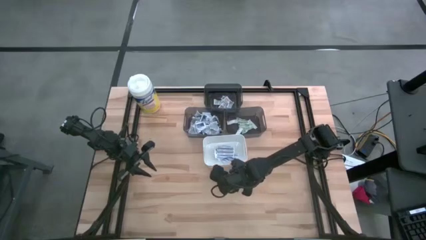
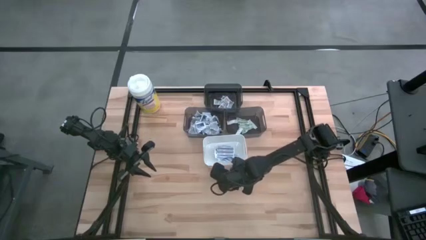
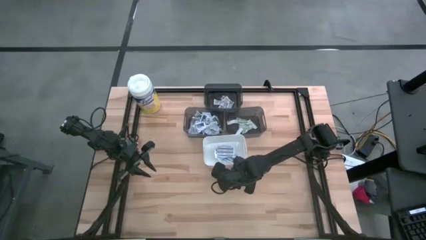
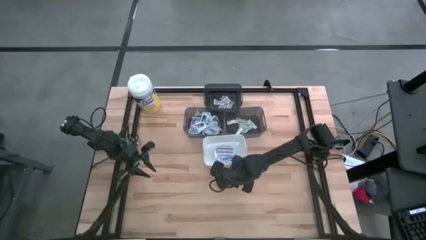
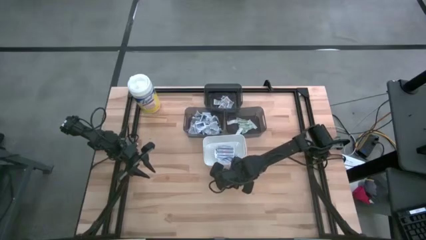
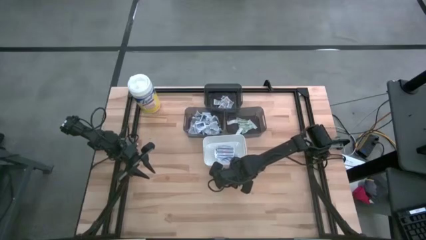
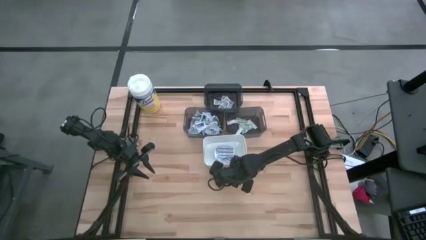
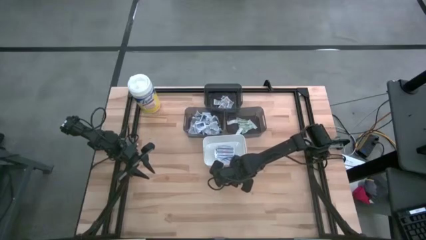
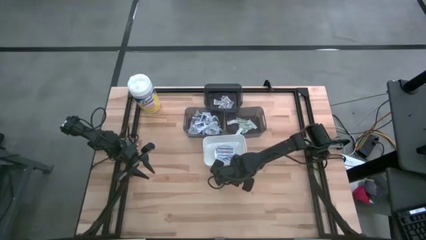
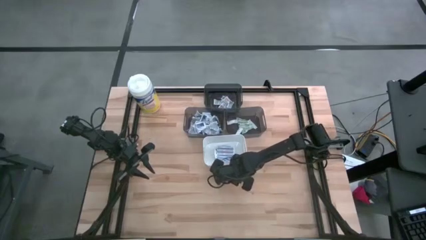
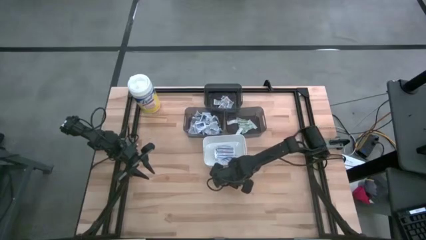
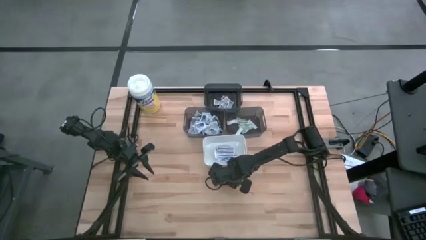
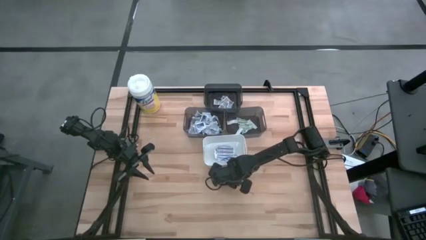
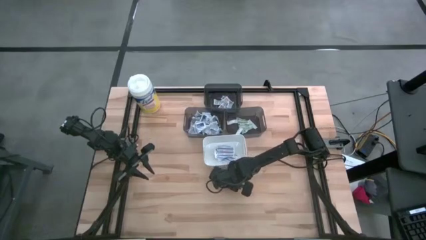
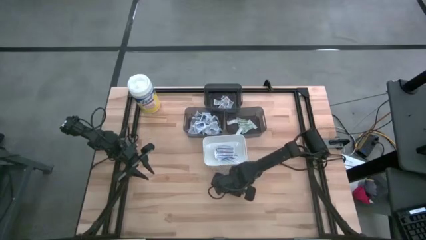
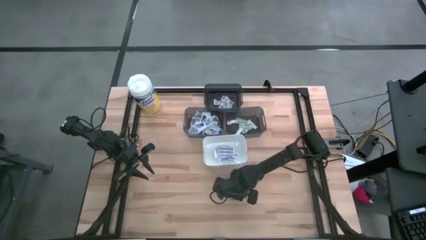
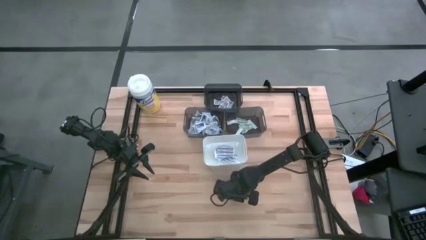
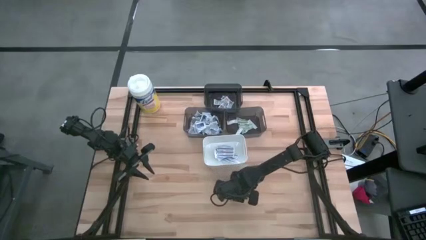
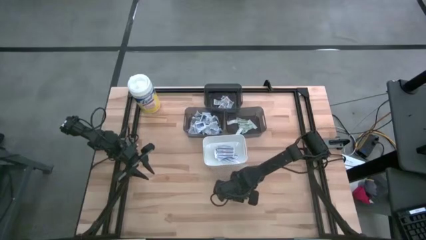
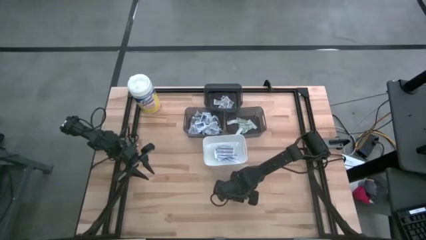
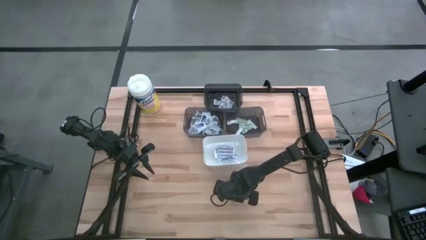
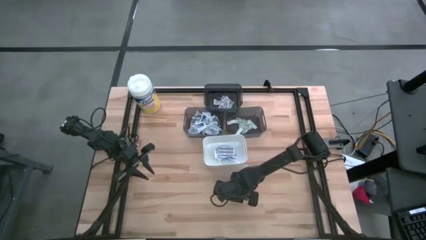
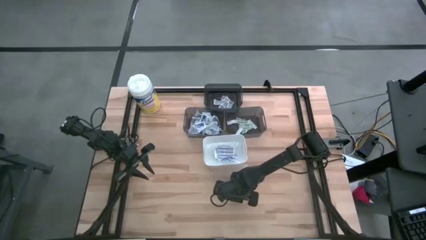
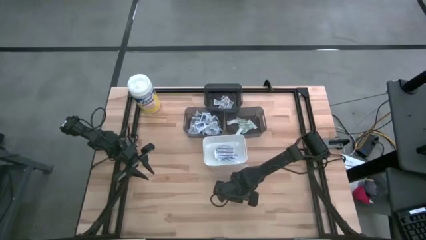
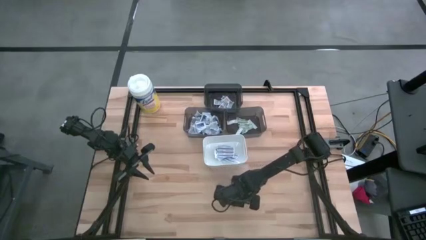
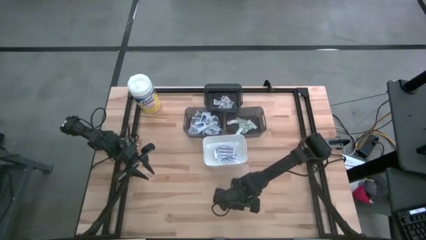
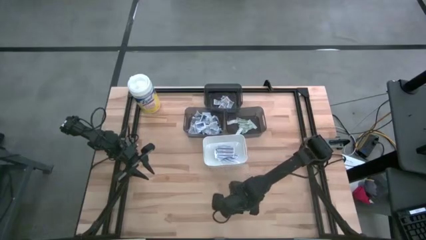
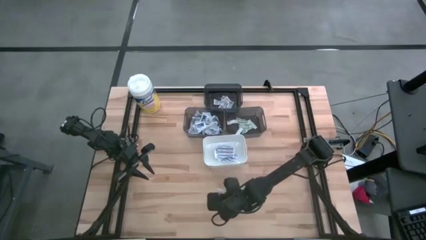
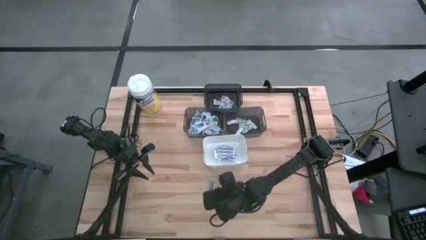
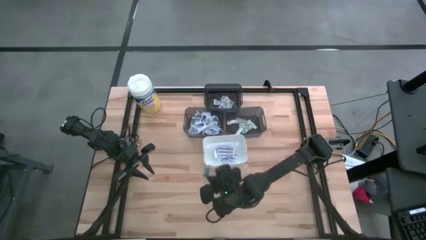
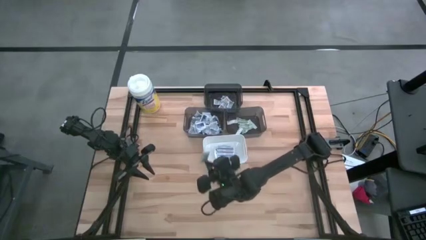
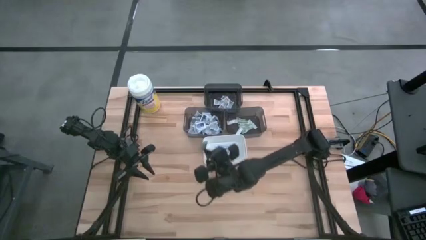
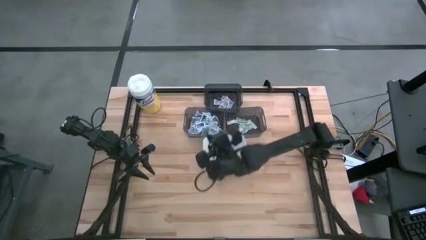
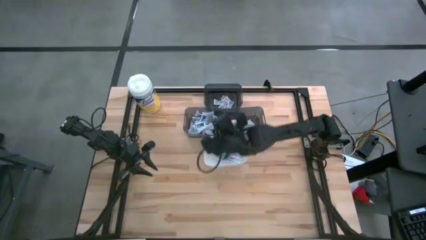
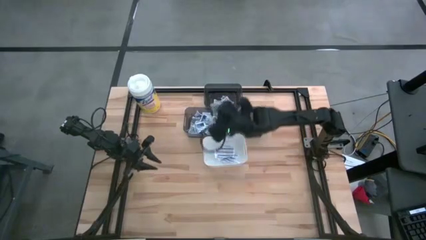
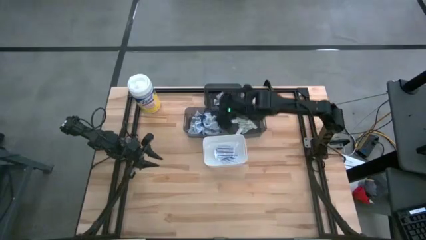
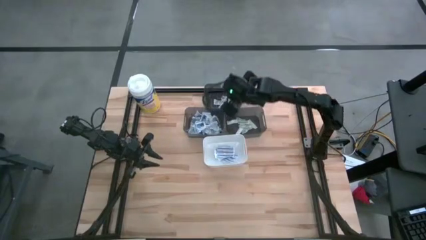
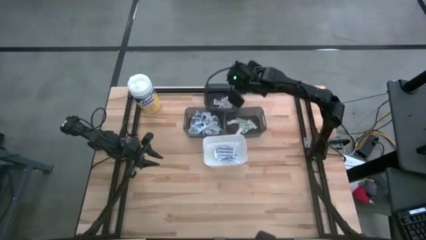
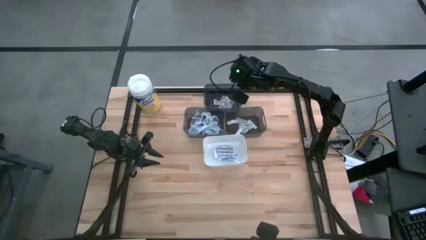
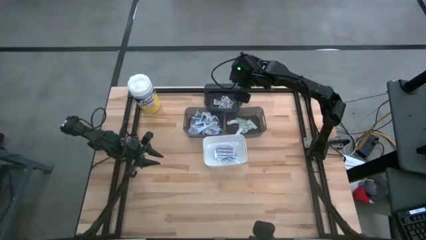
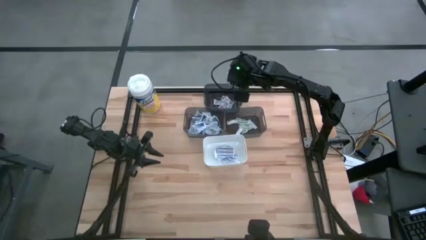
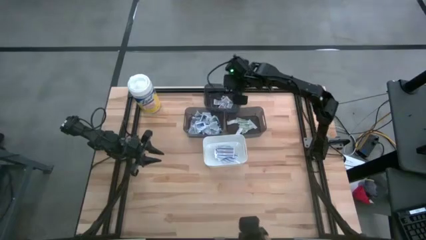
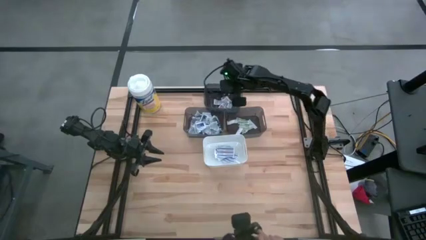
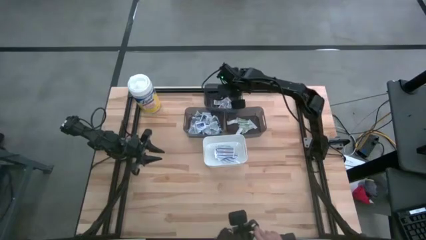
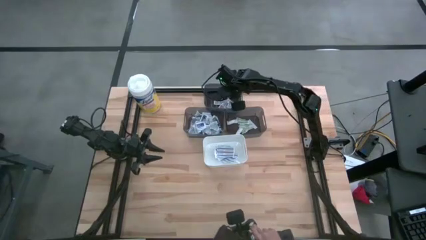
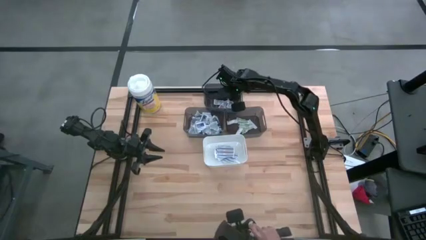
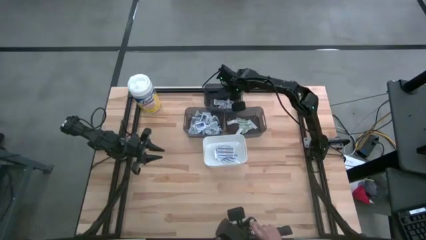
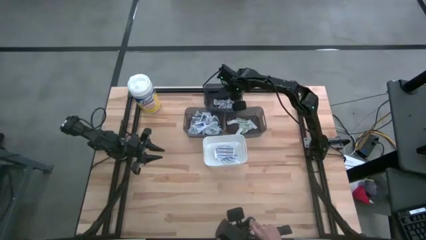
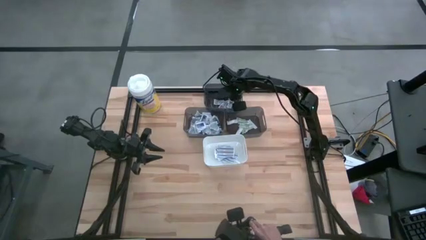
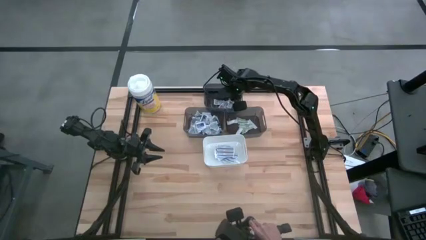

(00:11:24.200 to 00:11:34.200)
Task: Pick & Place First Aid Supplies
Put the ointment pack into the top black bin

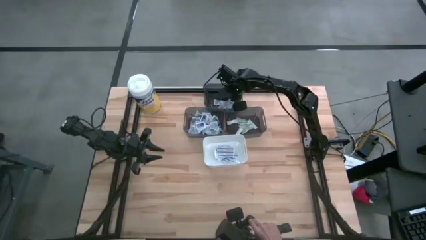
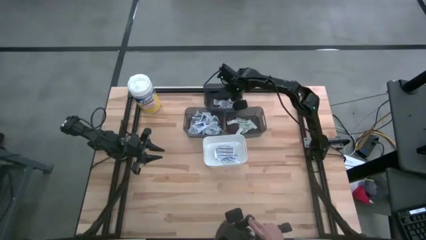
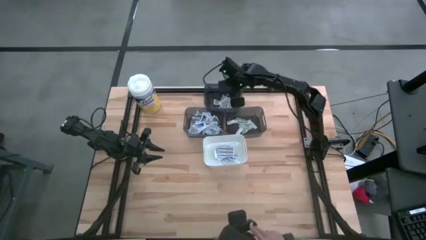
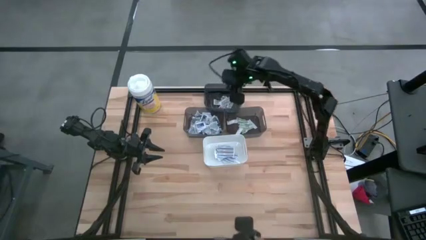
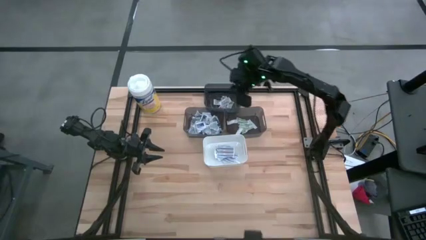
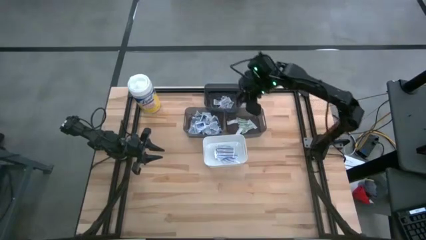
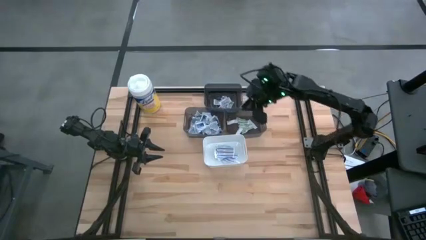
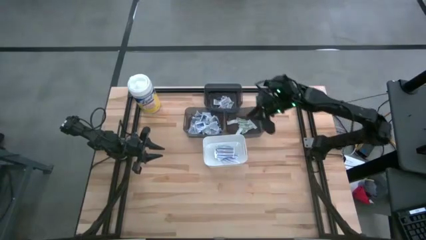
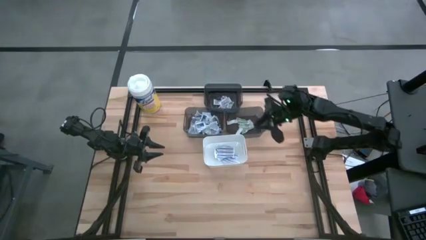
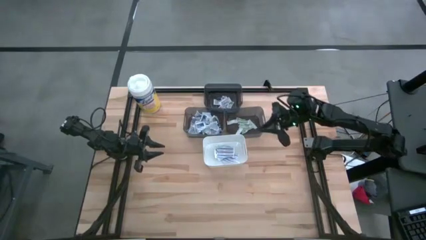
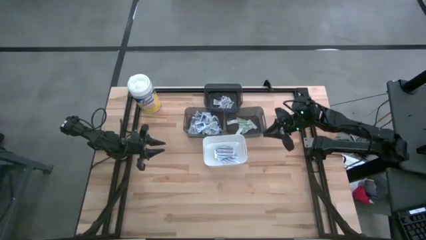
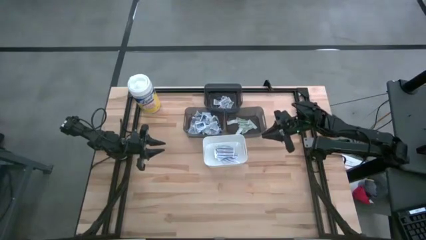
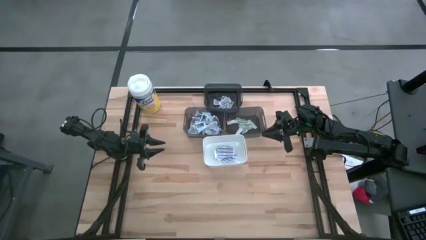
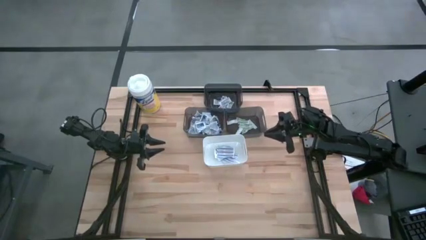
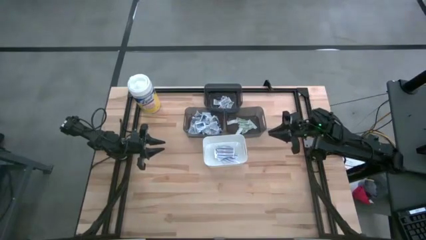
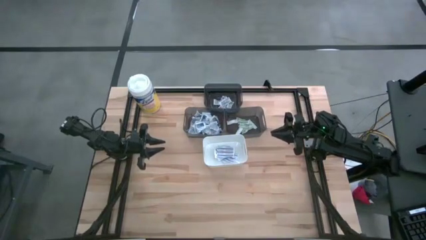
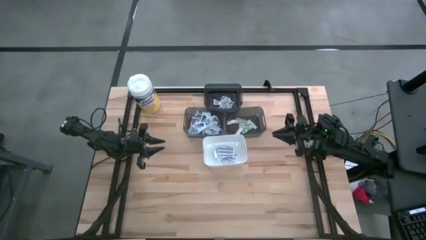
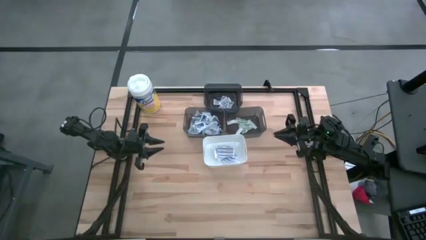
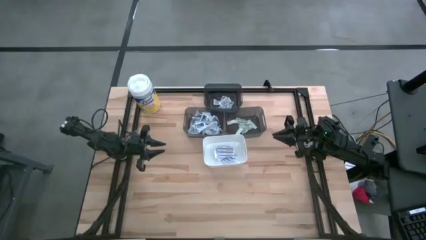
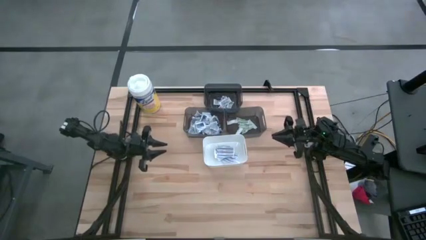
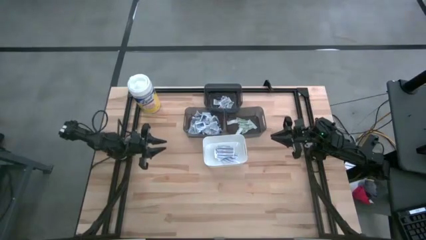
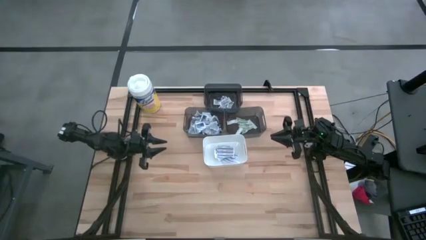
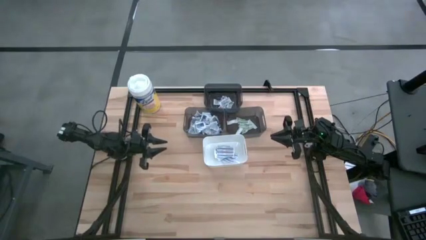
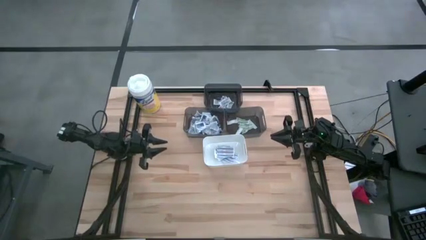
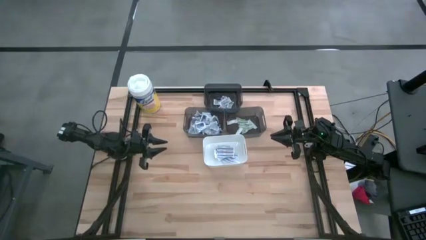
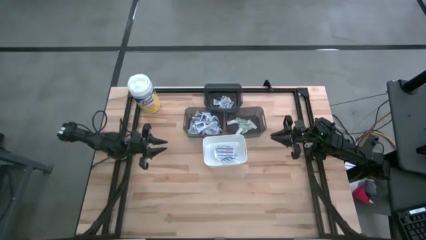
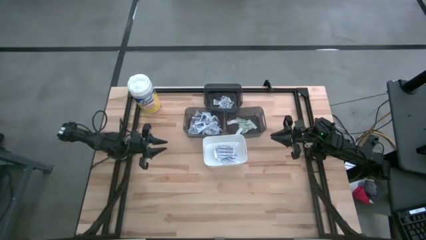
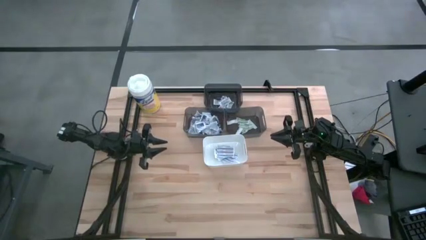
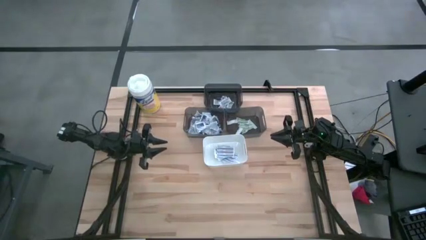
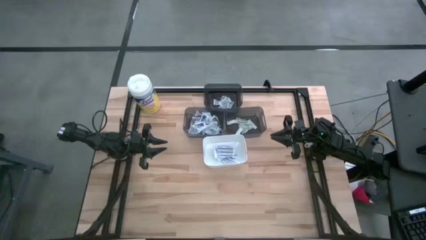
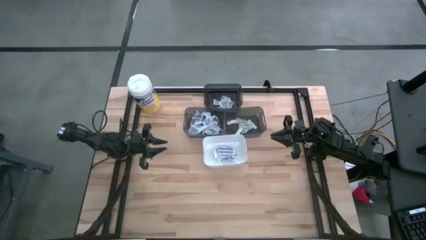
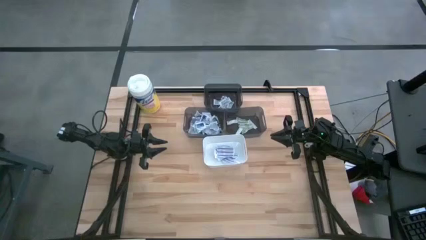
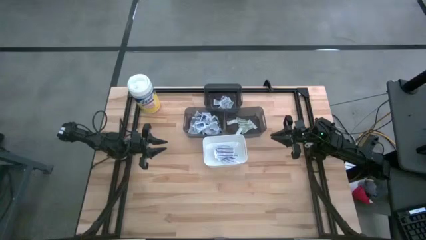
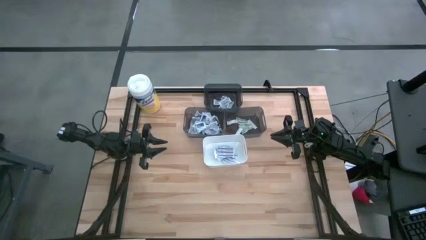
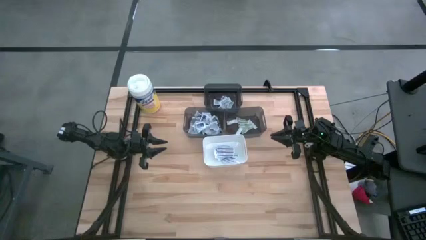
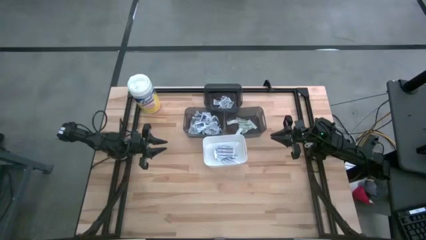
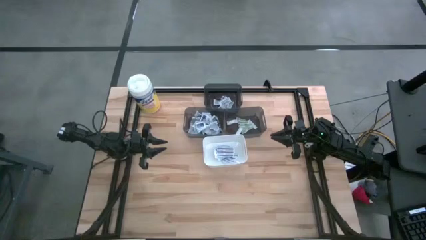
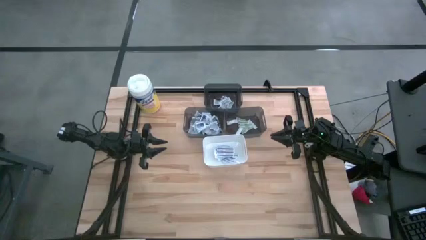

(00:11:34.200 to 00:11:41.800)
Return to Home Position
